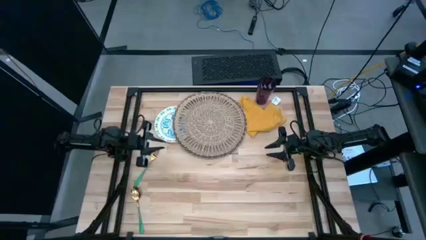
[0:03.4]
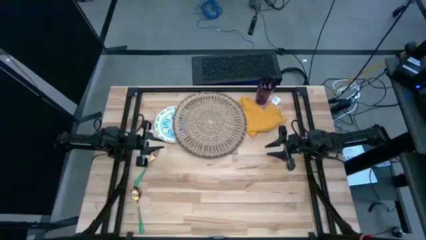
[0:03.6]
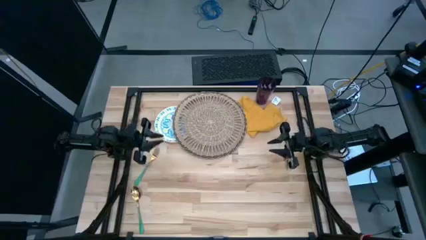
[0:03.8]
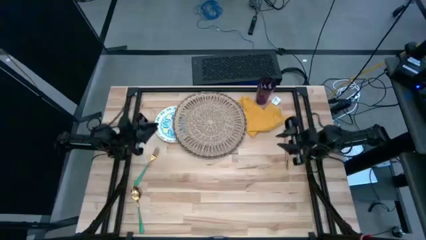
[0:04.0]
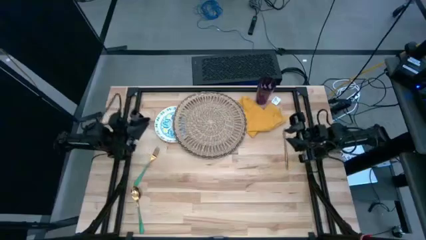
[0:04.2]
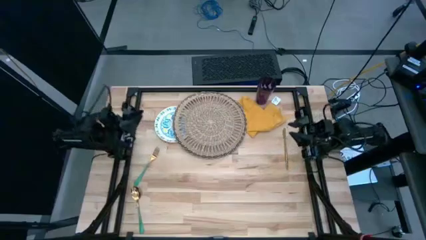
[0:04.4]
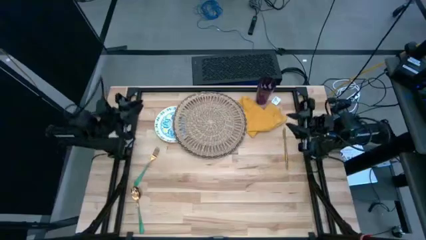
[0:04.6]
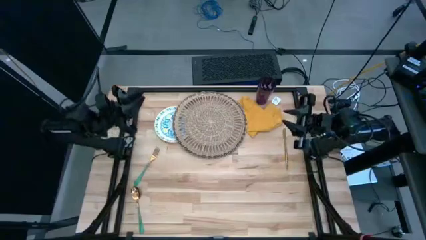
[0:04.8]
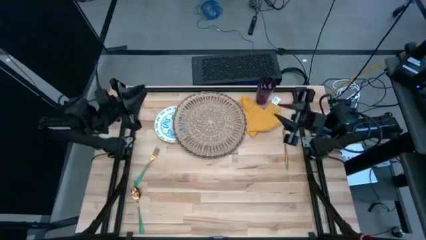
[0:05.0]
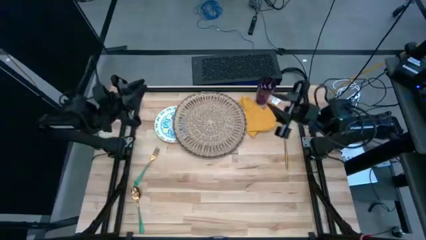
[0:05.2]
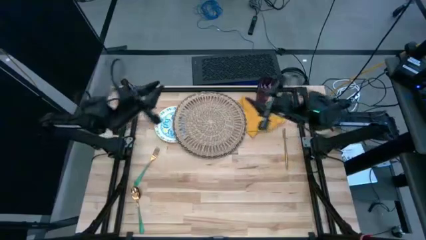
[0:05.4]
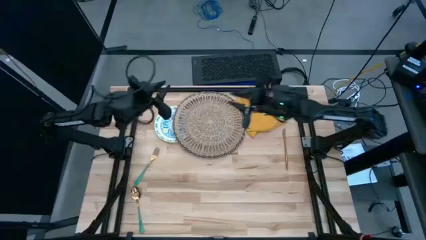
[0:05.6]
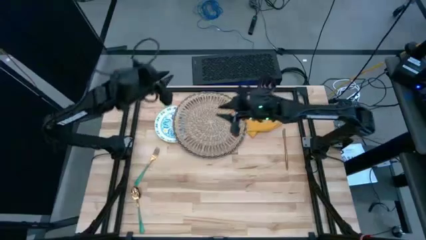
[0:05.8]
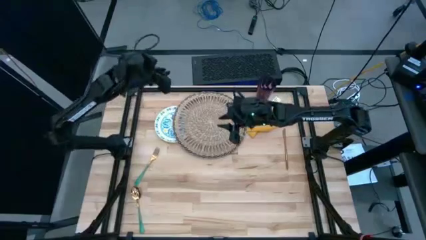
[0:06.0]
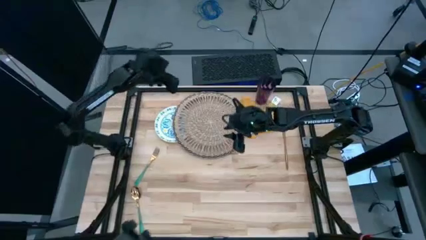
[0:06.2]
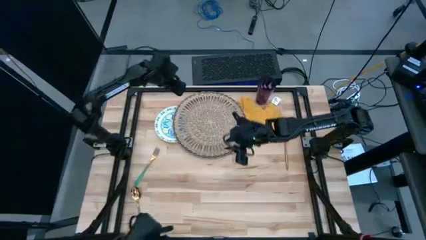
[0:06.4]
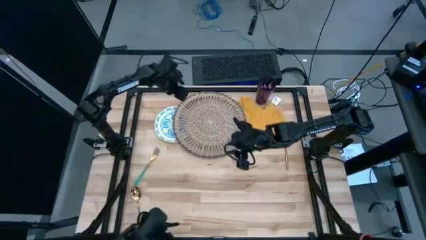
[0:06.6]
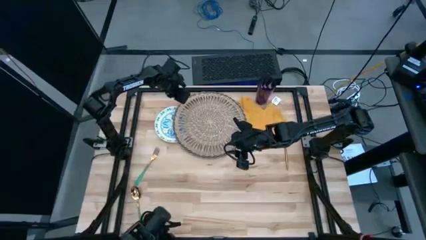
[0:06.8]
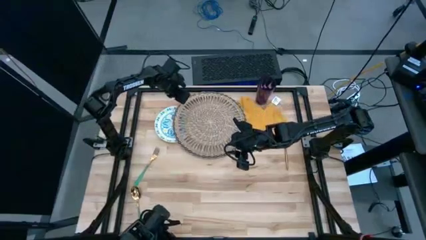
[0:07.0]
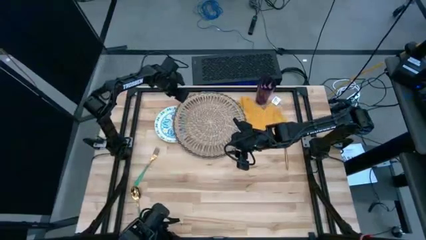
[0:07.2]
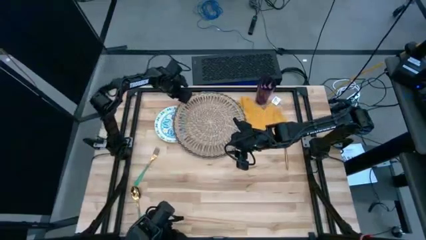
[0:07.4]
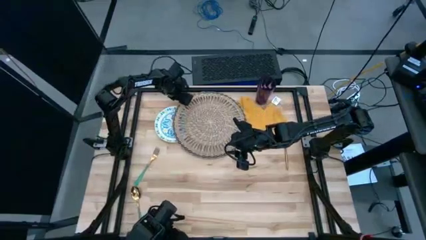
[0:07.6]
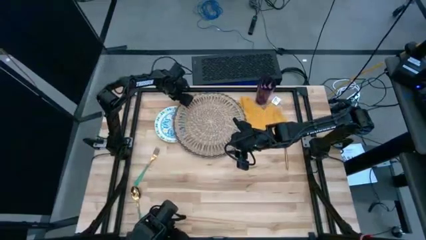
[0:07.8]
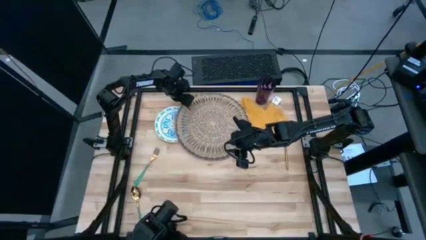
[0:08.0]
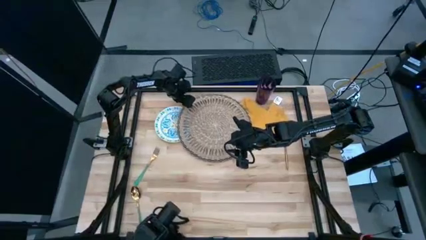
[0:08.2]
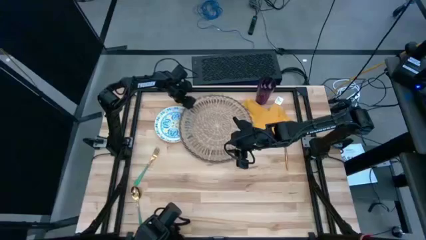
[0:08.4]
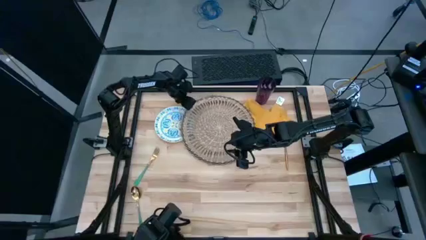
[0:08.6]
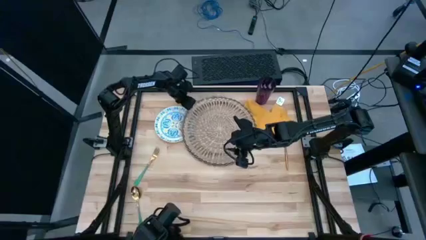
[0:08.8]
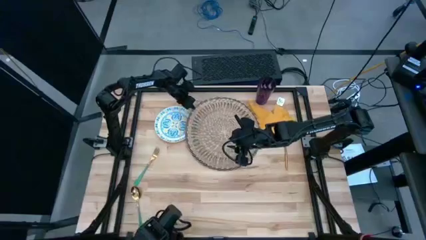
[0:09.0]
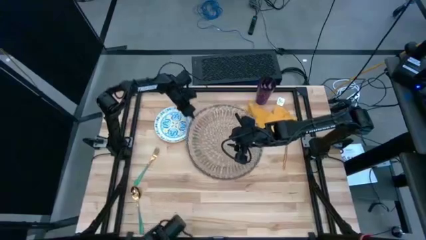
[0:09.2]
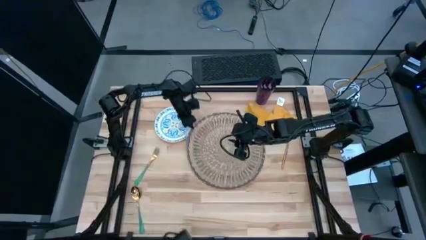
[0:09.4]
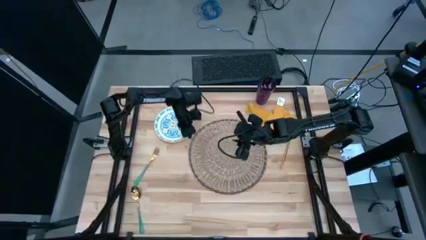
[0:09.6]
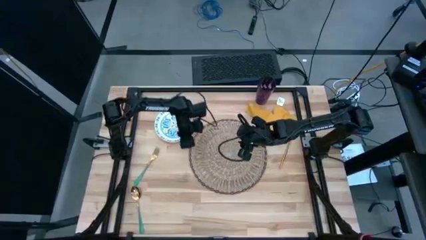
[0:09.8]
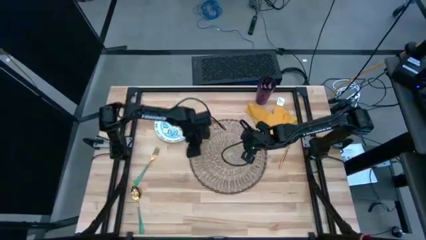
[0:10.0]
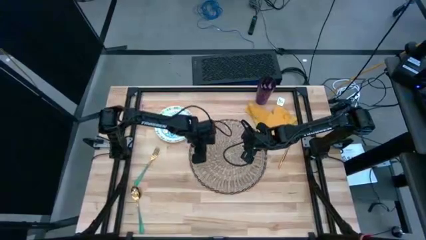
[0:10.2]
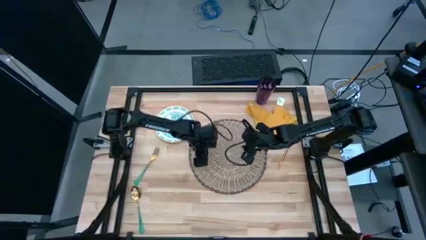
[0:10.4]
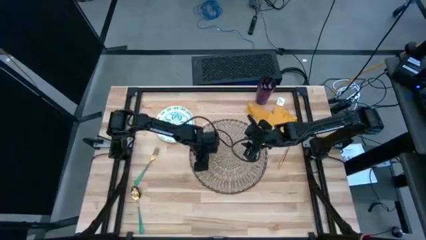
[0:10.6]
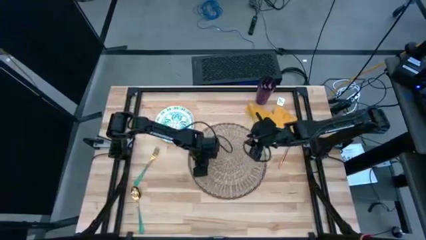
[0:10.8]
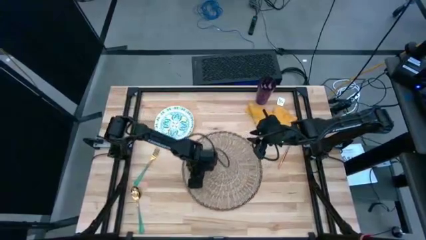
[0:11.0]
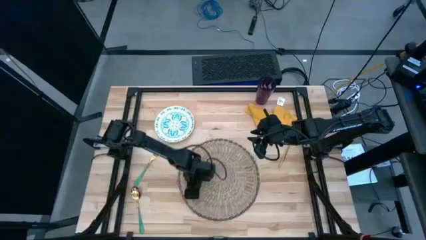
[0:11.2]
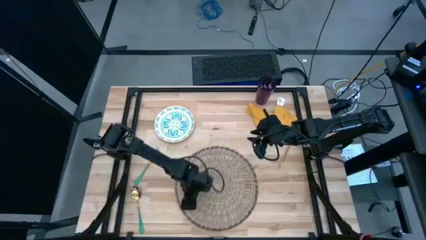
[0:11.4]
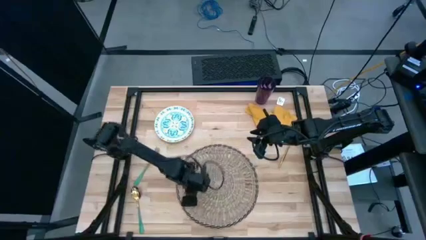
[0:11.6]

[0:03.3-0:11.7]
Task: Set table place
Move the brown placemat to the bottom center of the table
